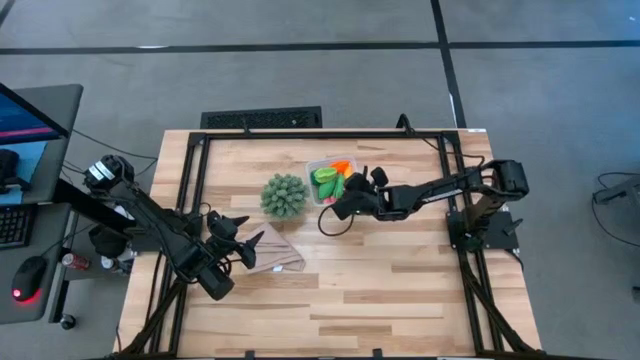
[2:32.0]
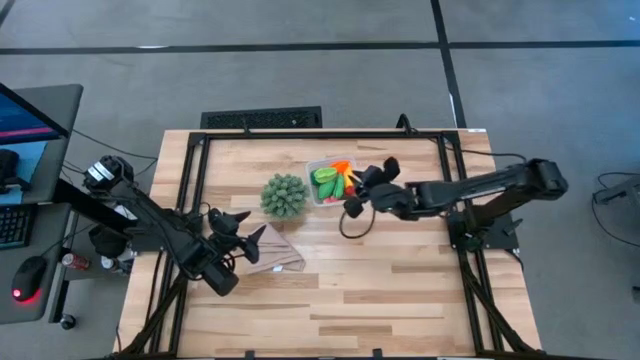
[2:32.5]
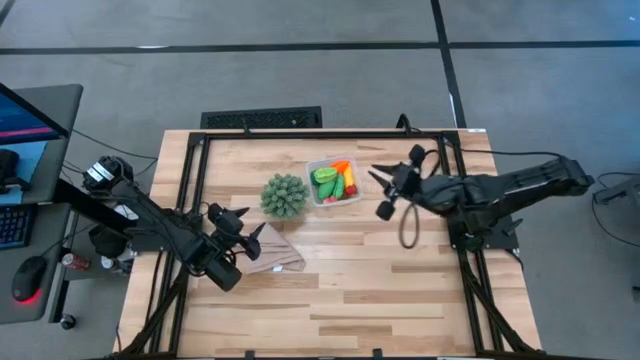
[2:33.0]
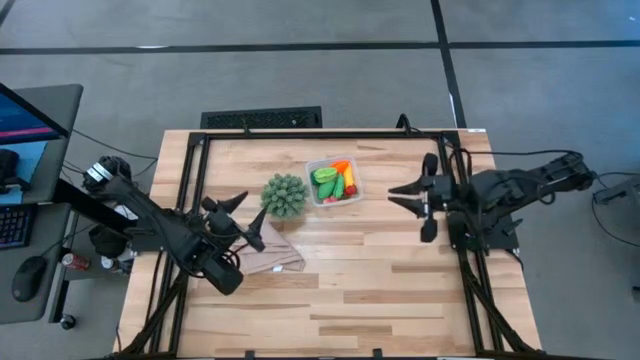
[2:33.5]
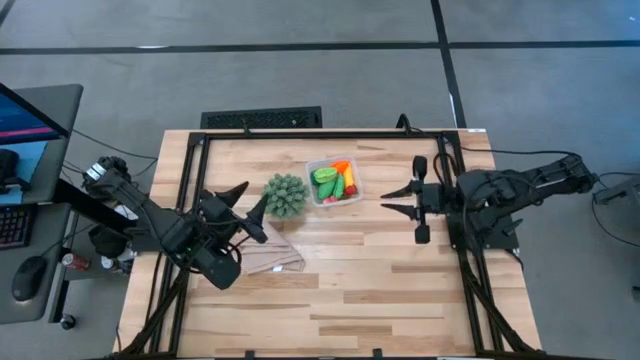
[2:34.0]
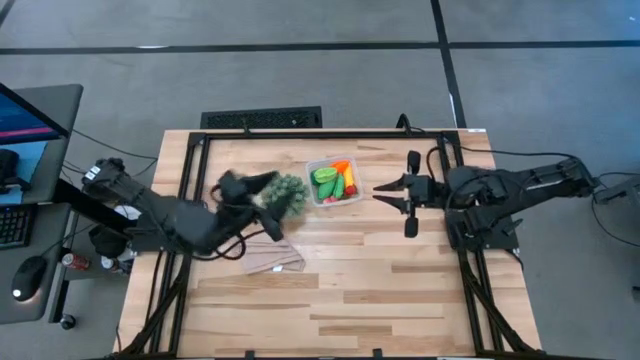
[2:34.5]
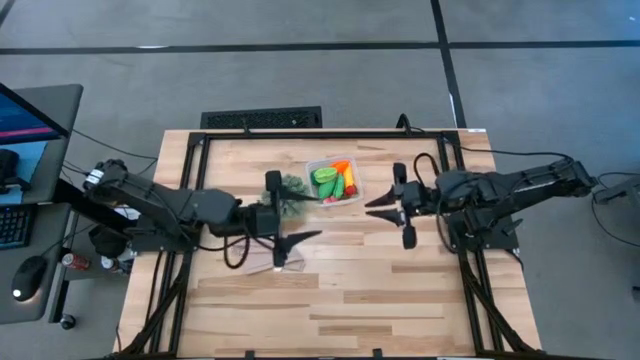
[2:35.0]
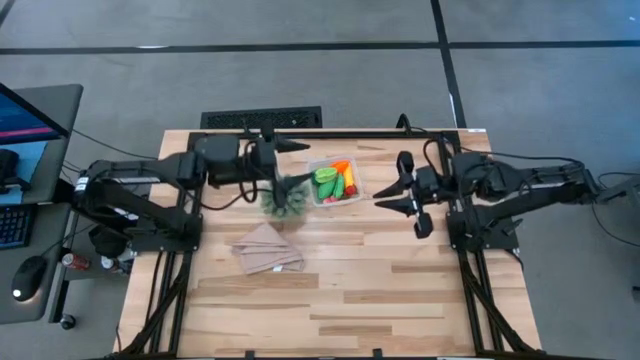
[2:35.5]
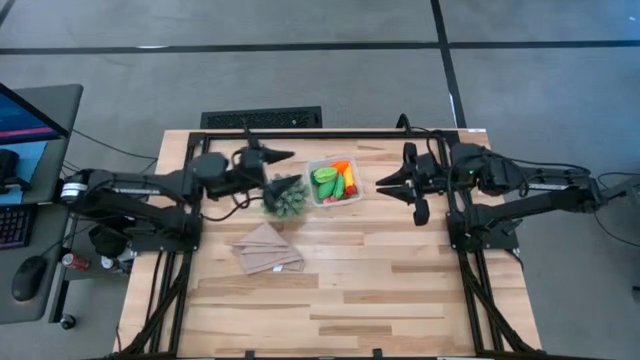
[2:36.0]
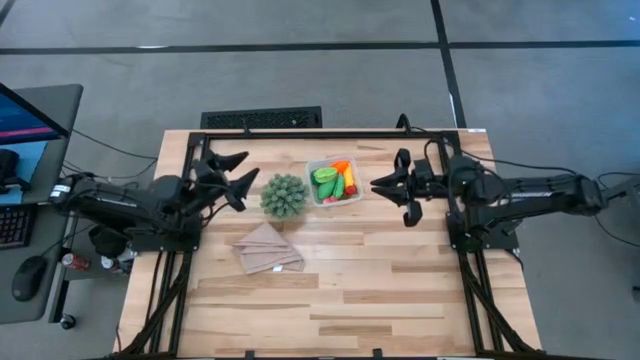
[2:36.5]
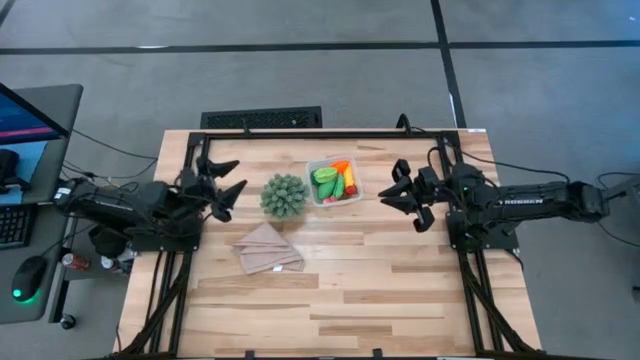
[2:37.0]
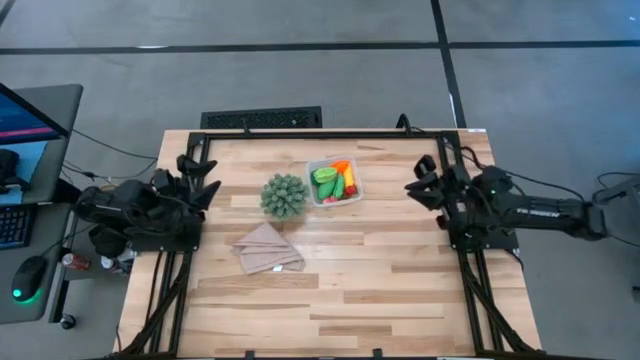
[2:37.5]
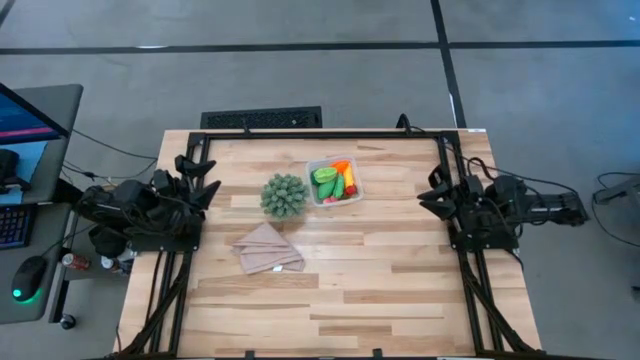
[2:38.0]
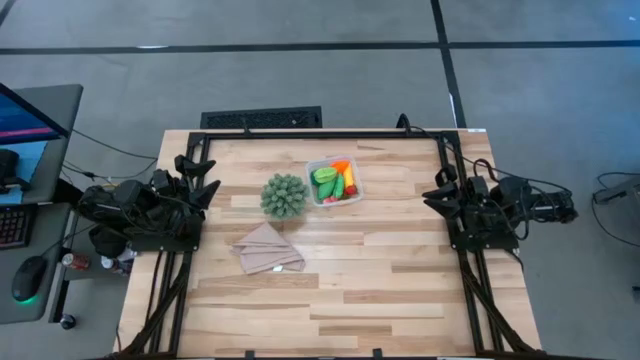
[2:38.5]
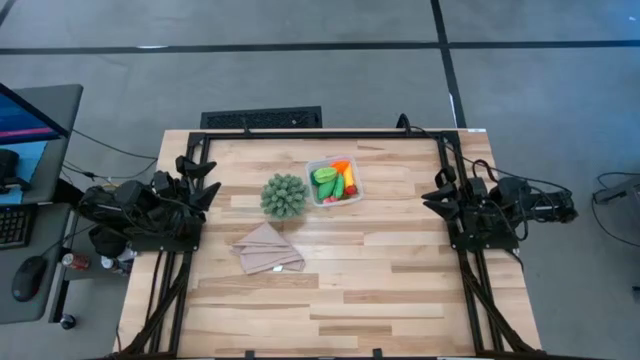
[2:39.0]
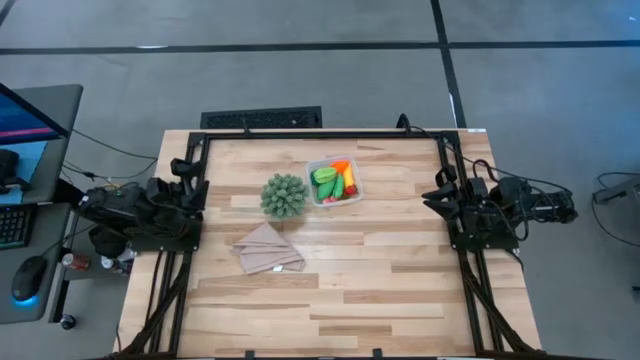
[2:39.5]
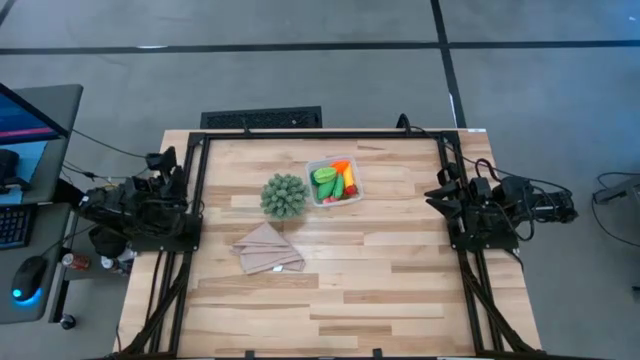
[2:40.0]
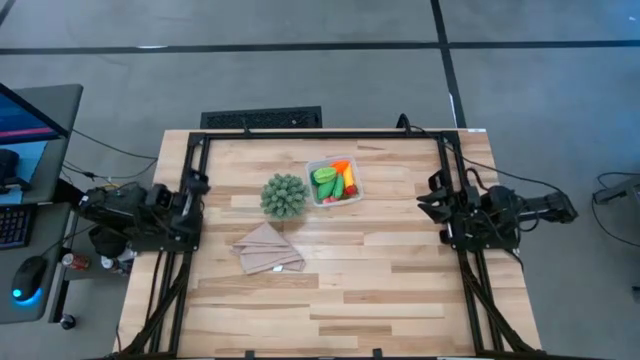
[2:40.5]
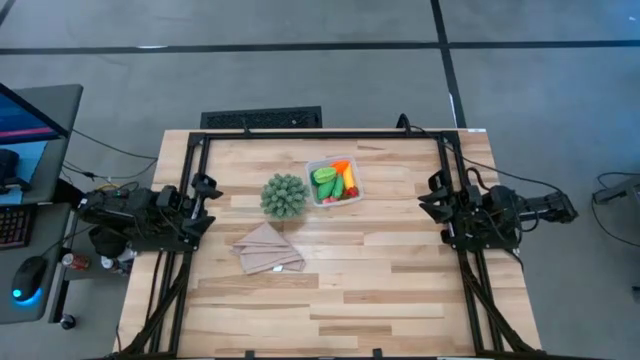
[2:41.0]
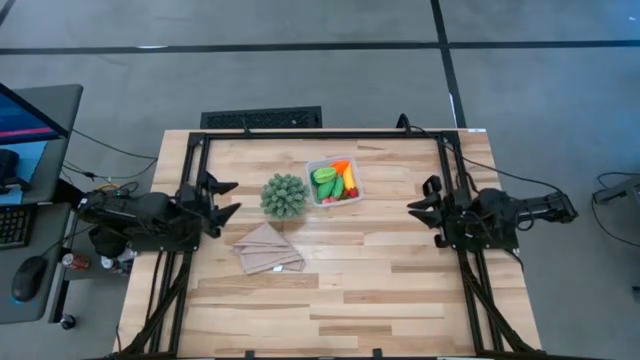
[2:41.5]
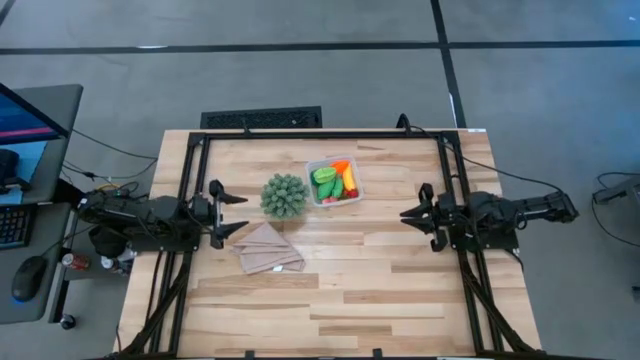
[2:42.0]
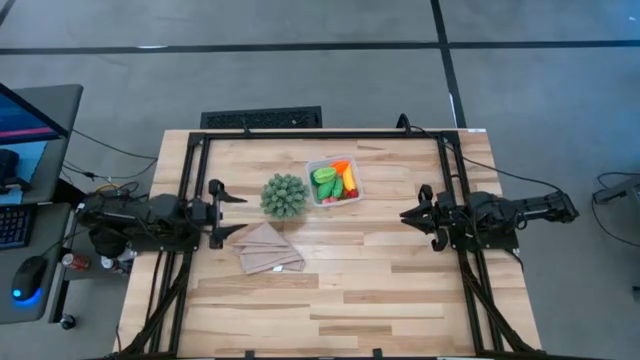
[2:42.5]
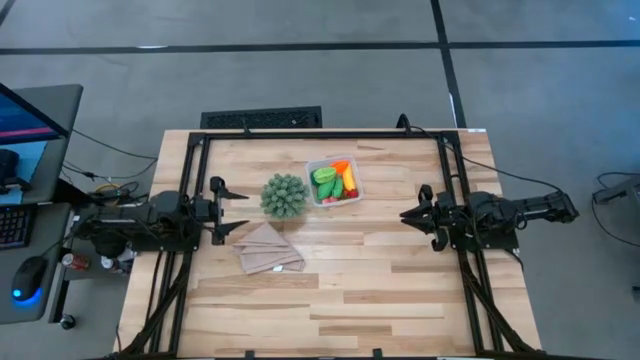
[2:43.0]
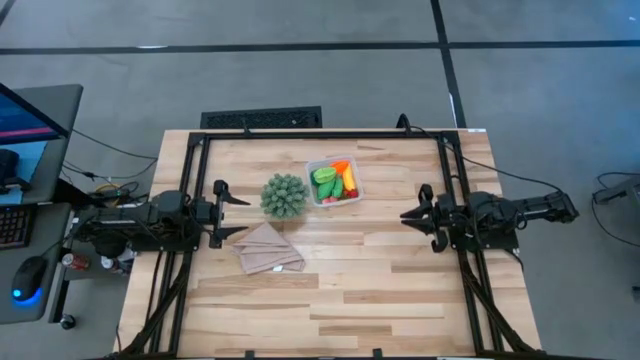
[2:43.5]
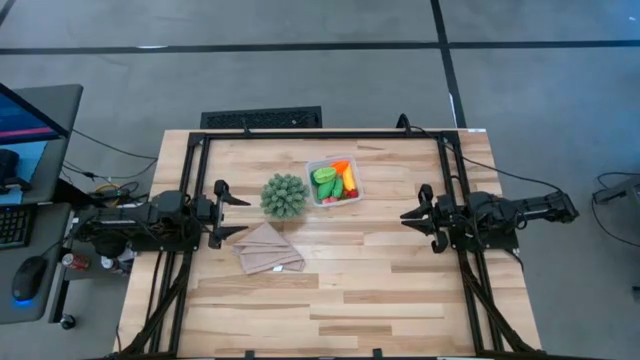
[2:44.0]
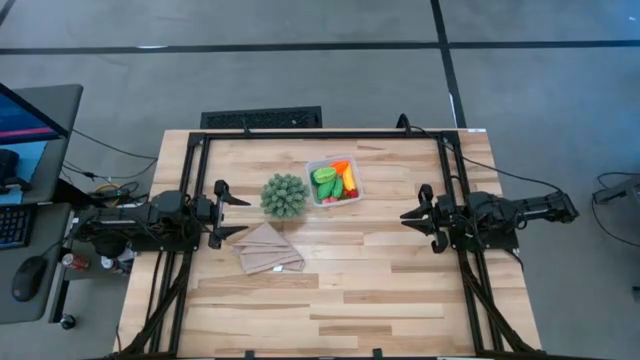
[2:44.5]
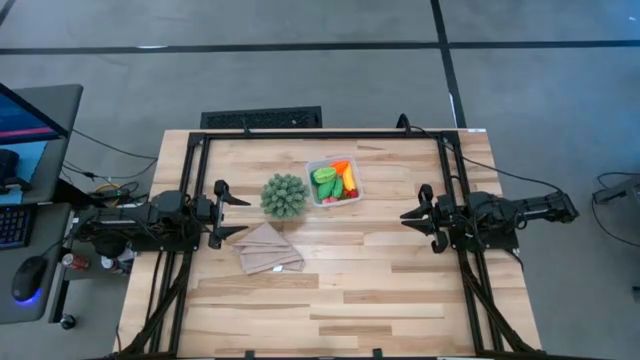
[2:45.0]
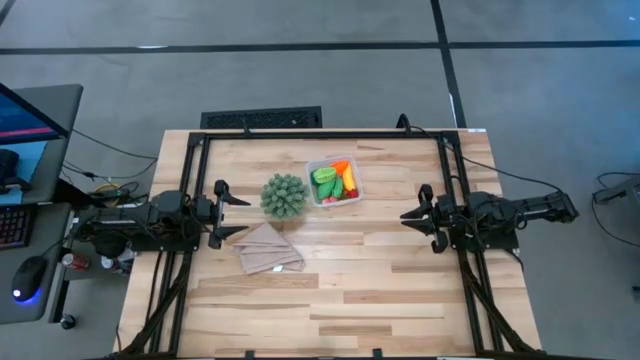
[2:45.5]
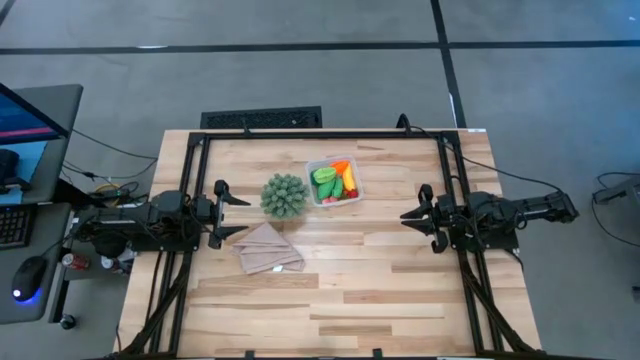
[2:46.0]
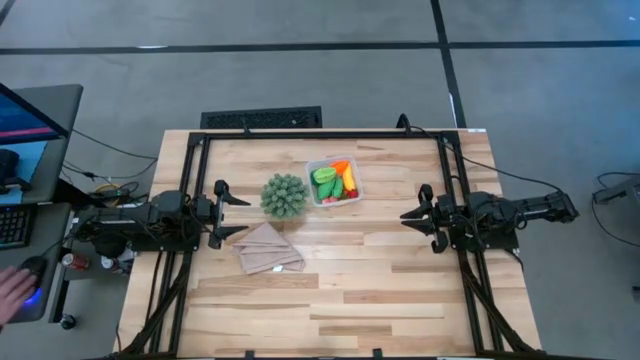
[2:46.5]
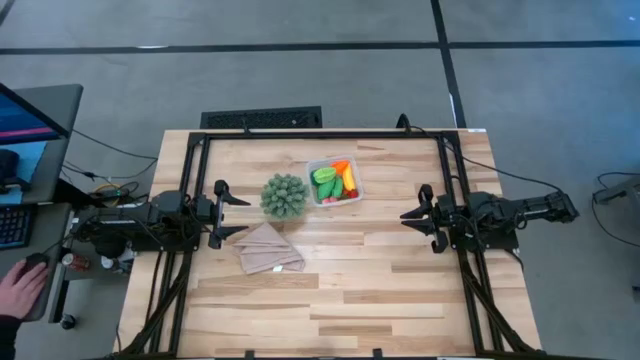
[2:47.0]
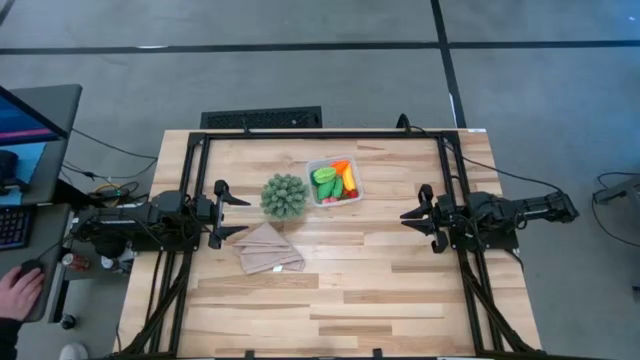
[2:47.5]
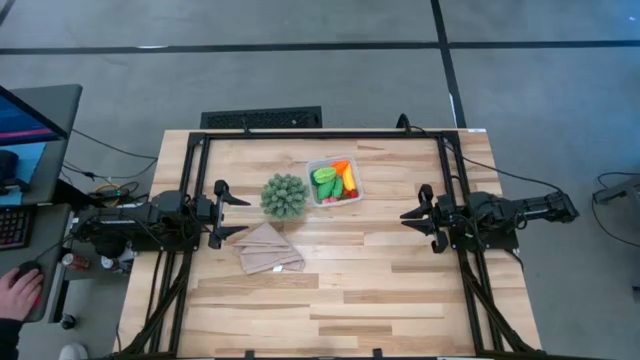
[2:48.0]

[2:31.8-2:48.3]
Task: Pick and placing Produce into tupperware
Return to Home Position

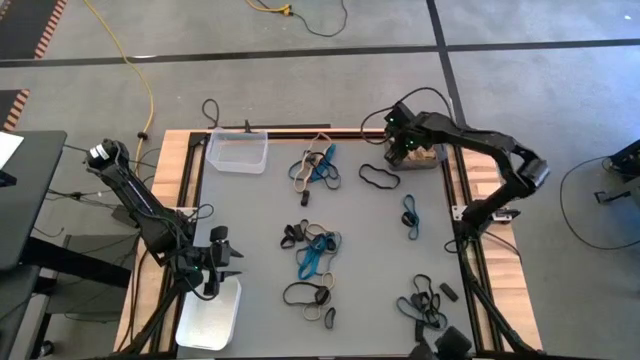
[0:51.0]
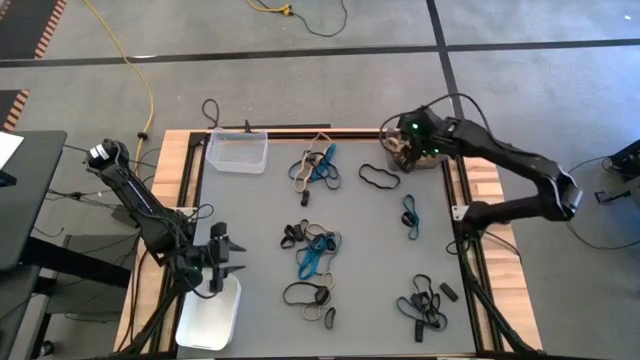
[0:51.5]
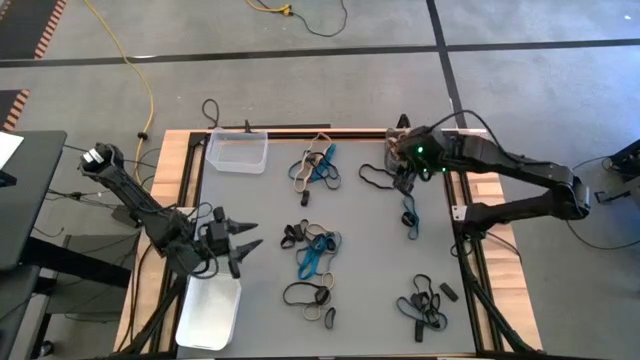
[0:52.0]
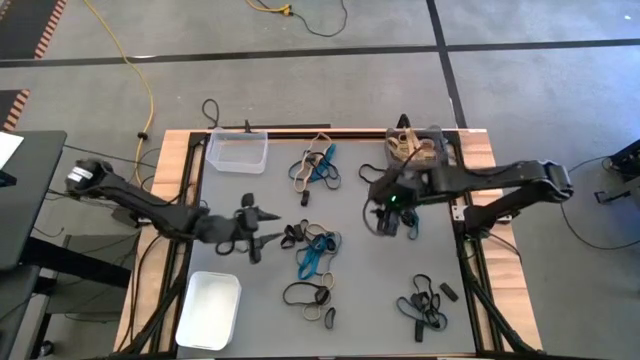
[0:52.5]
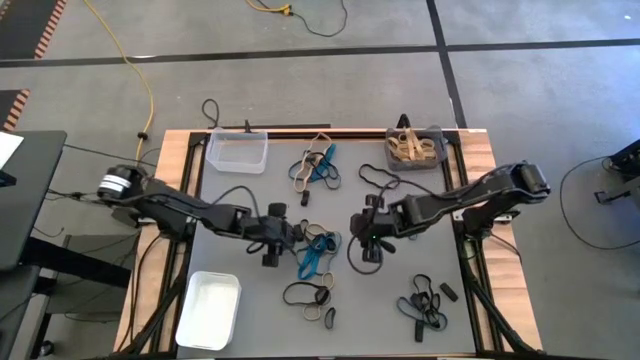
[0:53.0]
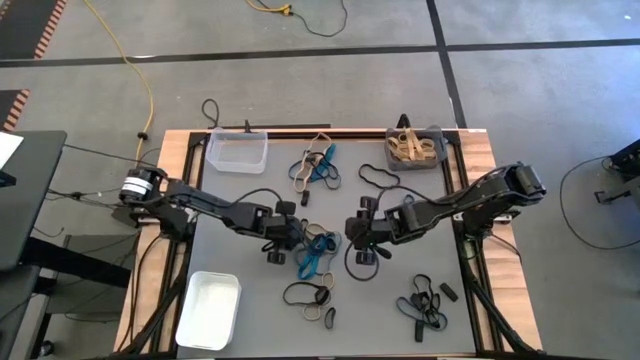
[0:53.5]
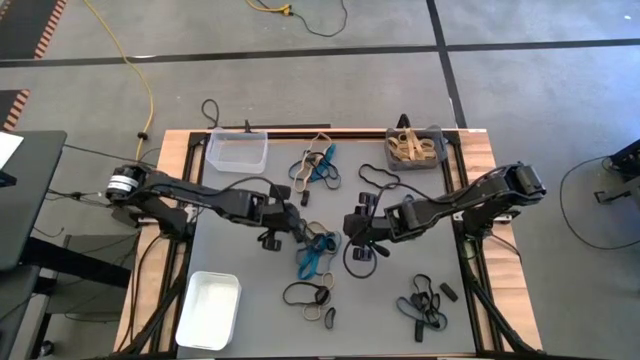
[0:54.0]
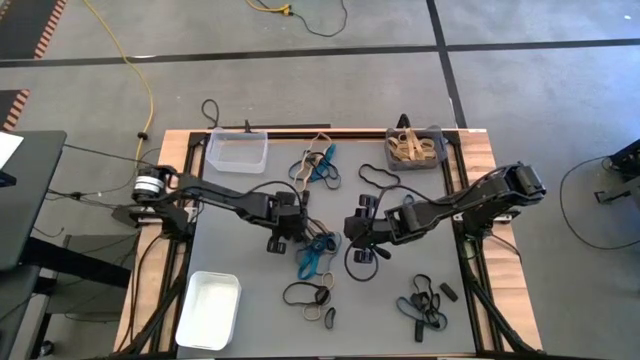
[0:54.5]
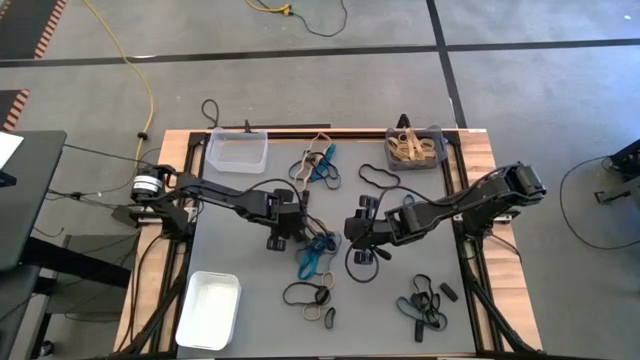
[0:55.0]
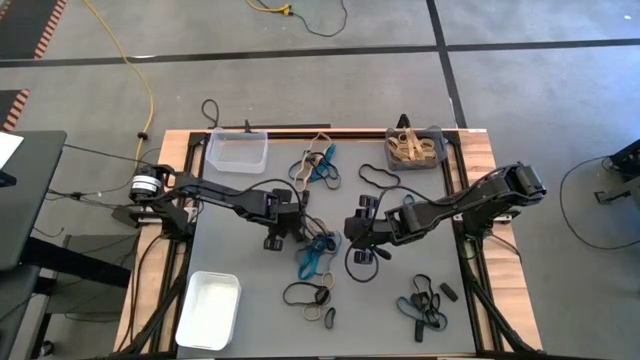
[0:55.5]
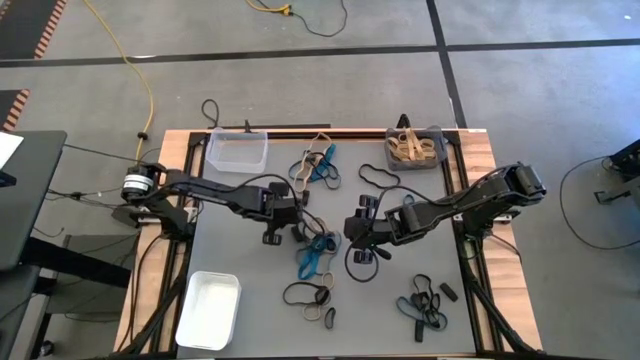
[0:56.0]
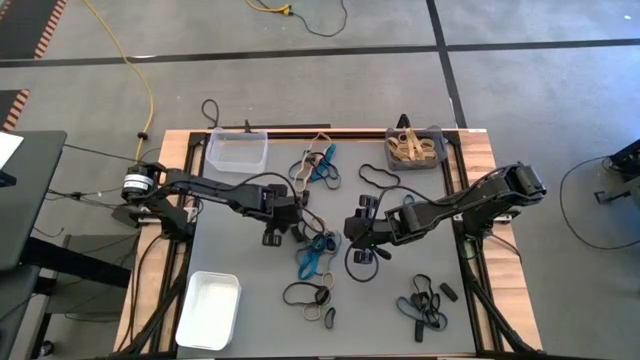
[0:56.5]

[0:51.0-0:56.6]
Task: Sort rubber bands into baskets
Put the black rubber band into the transparent bin
